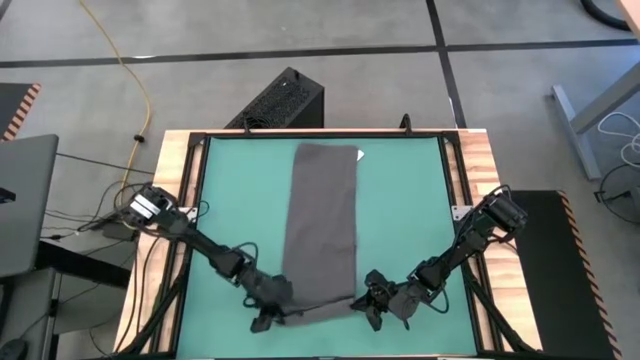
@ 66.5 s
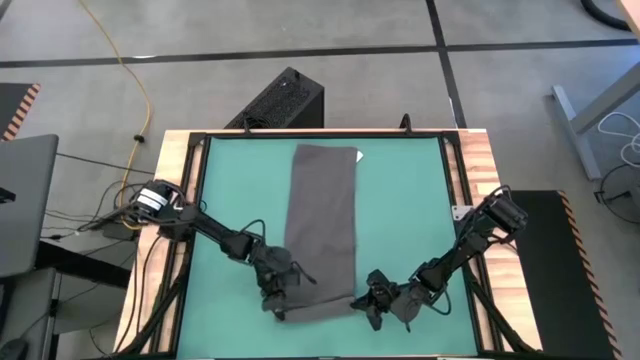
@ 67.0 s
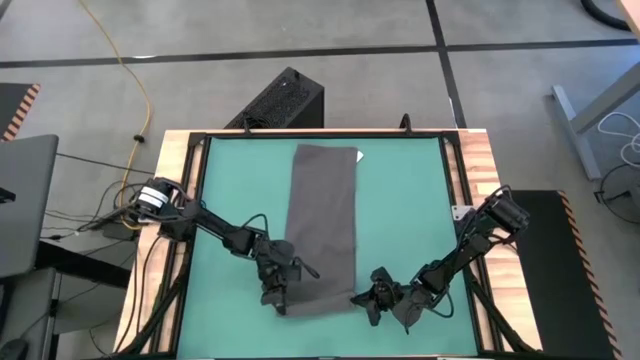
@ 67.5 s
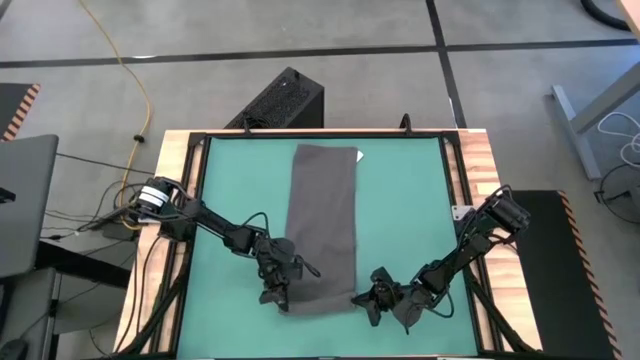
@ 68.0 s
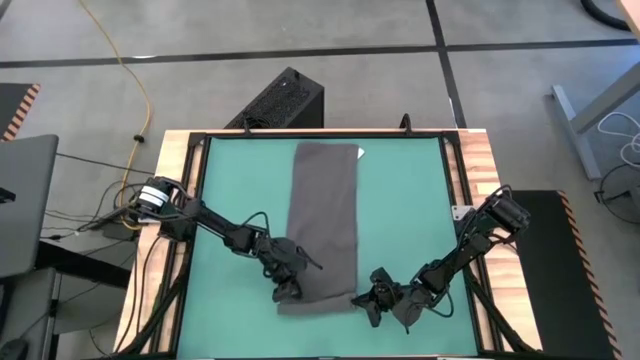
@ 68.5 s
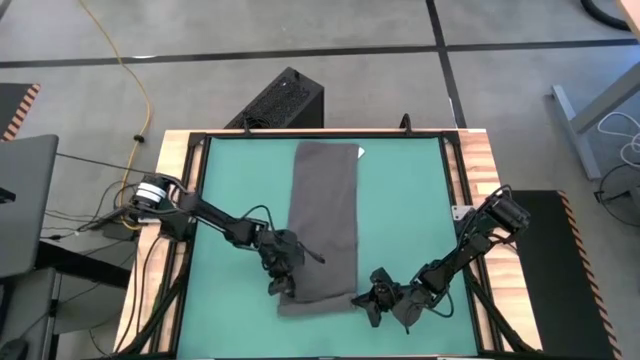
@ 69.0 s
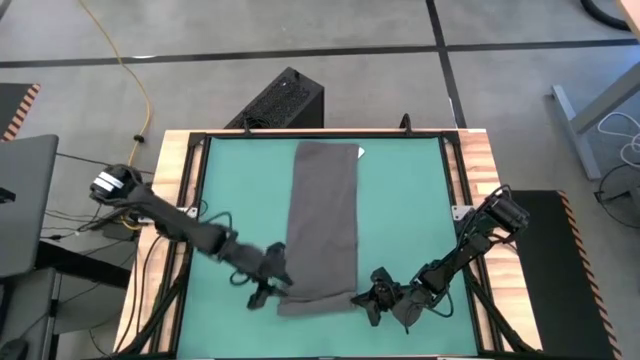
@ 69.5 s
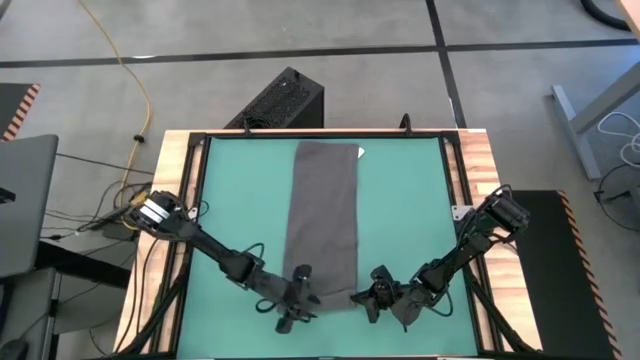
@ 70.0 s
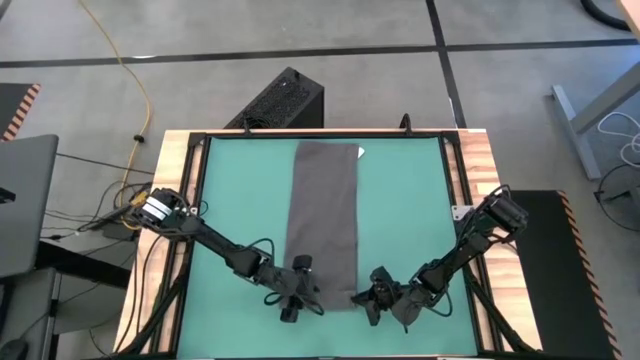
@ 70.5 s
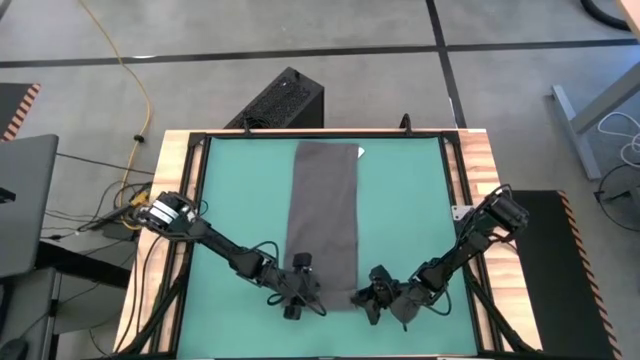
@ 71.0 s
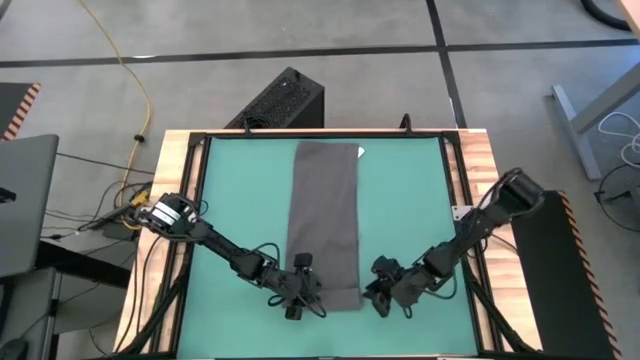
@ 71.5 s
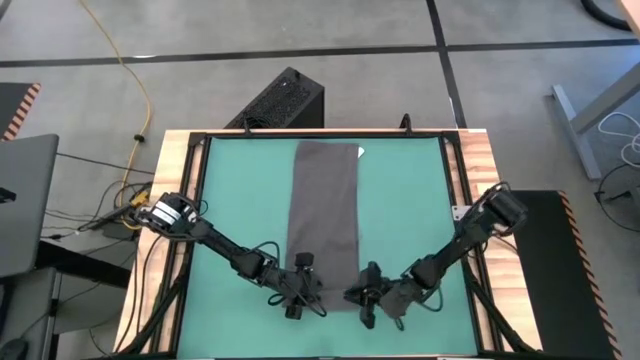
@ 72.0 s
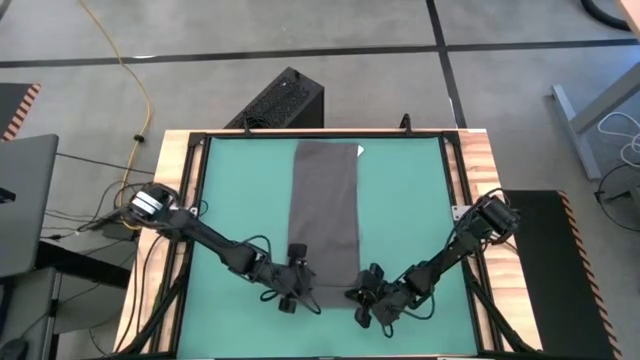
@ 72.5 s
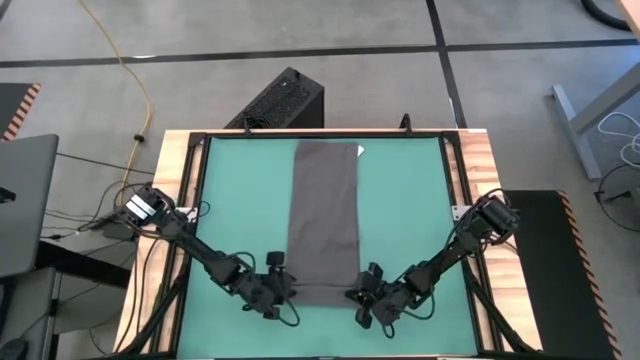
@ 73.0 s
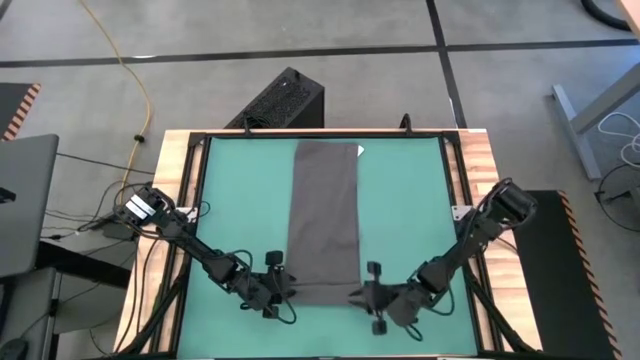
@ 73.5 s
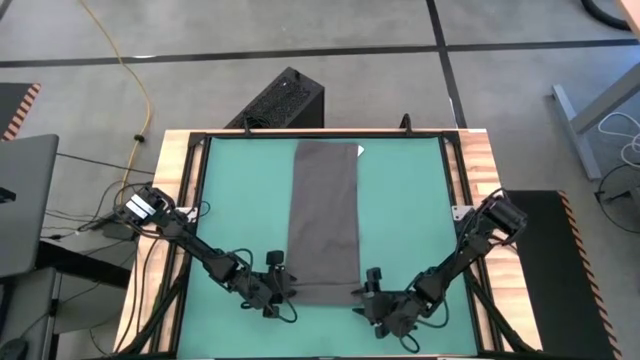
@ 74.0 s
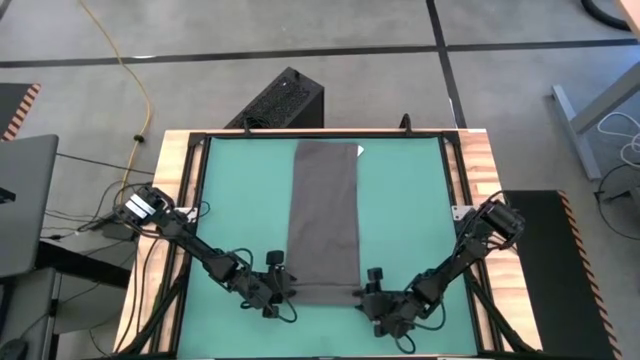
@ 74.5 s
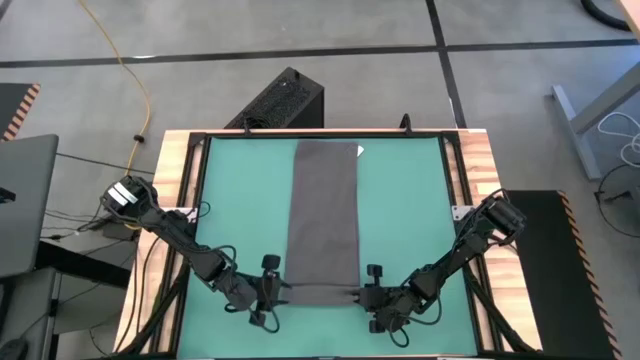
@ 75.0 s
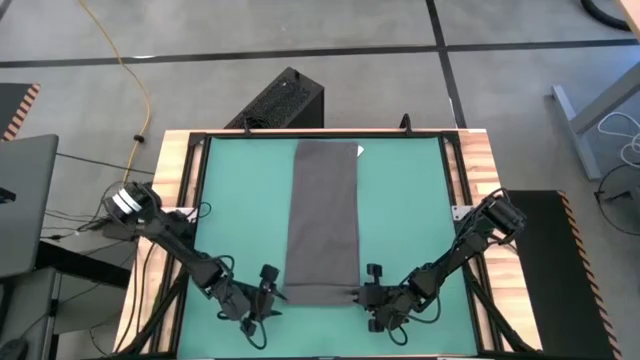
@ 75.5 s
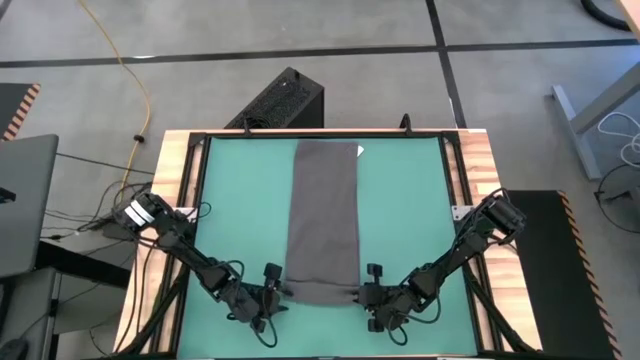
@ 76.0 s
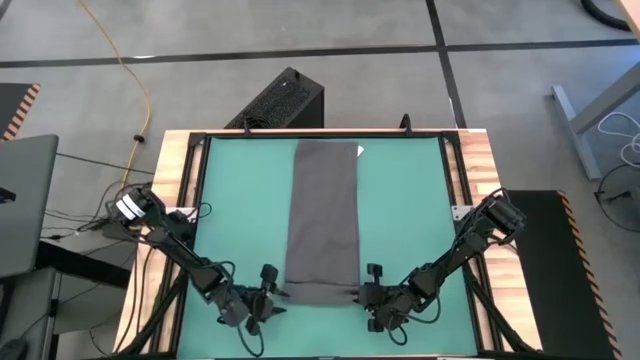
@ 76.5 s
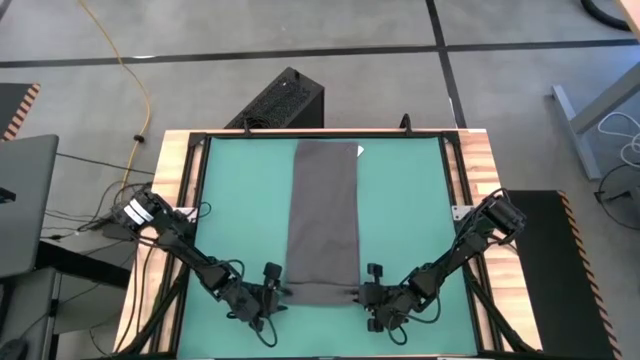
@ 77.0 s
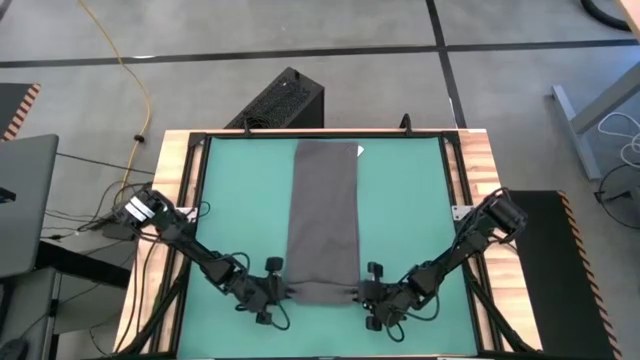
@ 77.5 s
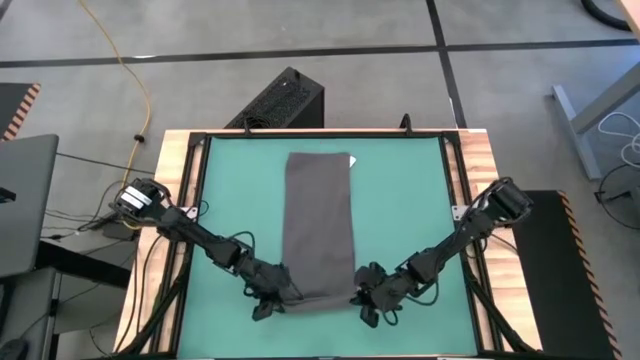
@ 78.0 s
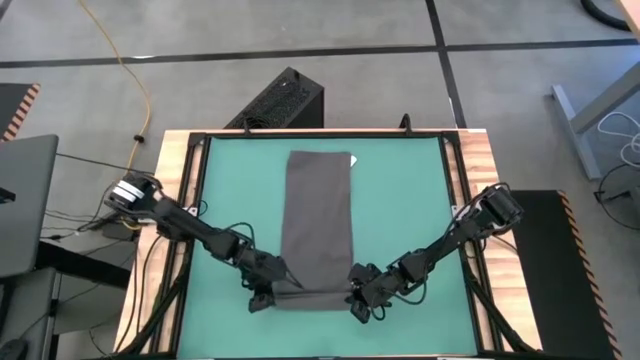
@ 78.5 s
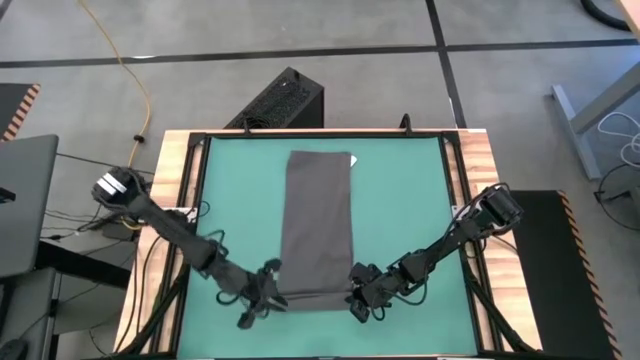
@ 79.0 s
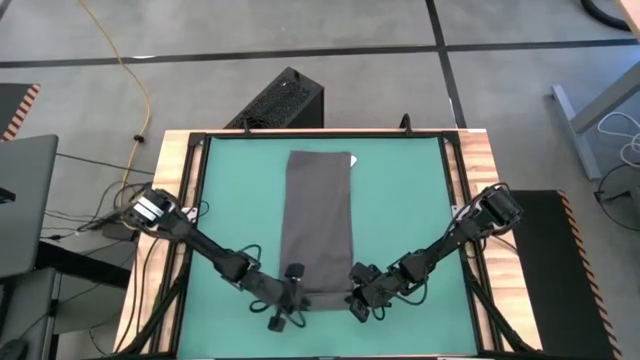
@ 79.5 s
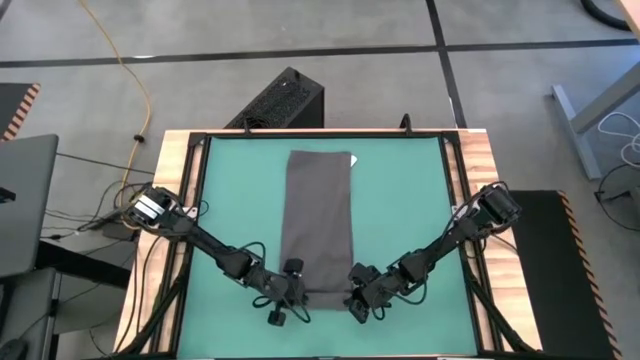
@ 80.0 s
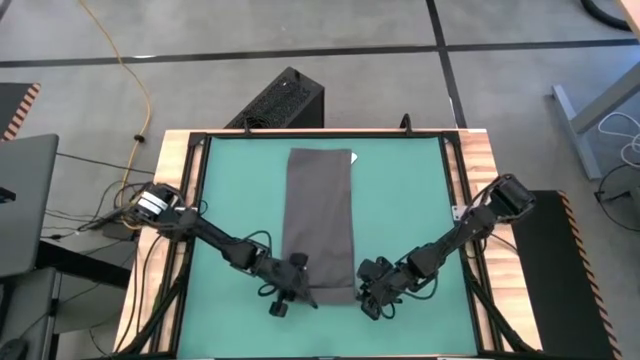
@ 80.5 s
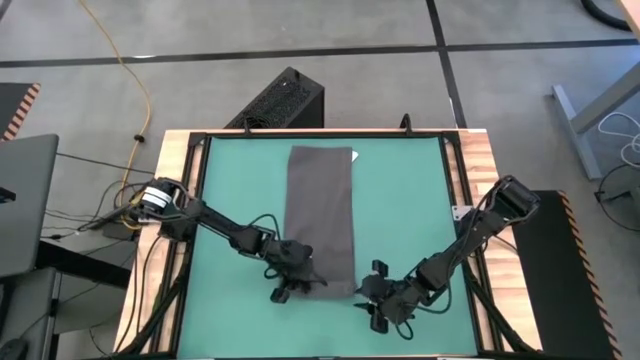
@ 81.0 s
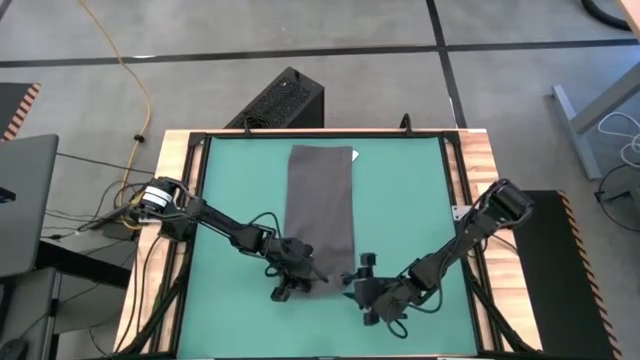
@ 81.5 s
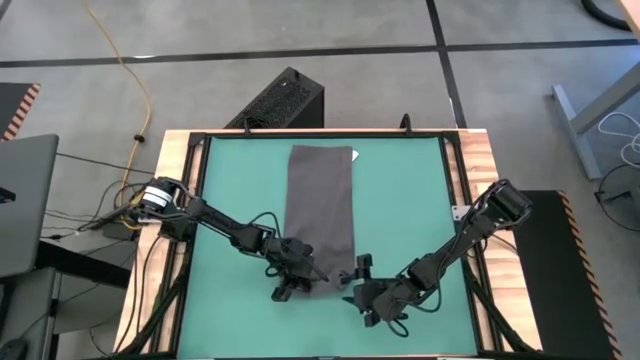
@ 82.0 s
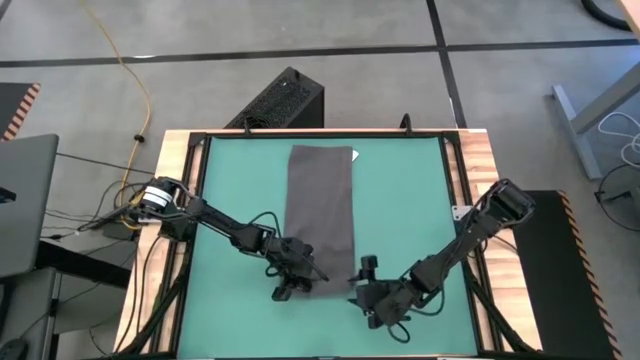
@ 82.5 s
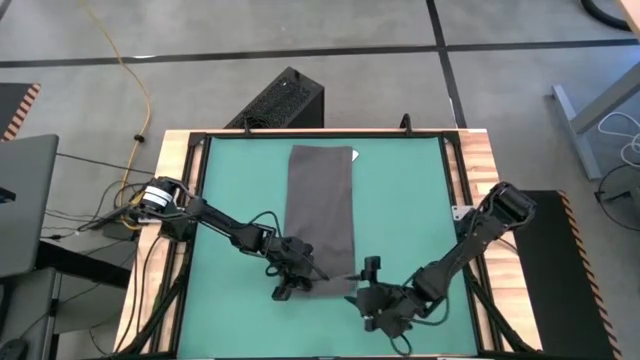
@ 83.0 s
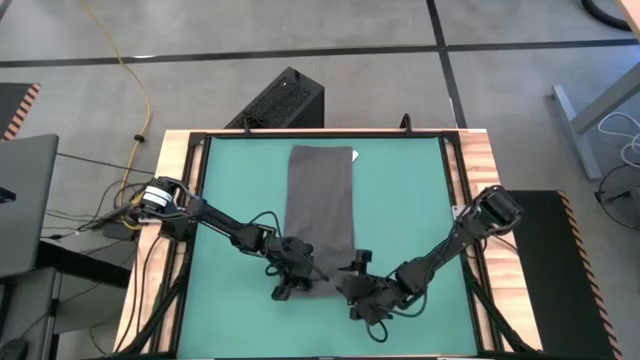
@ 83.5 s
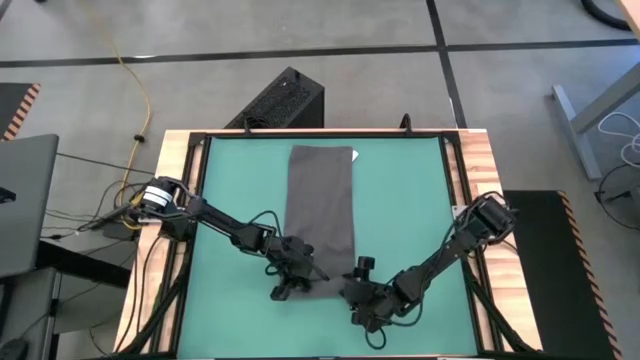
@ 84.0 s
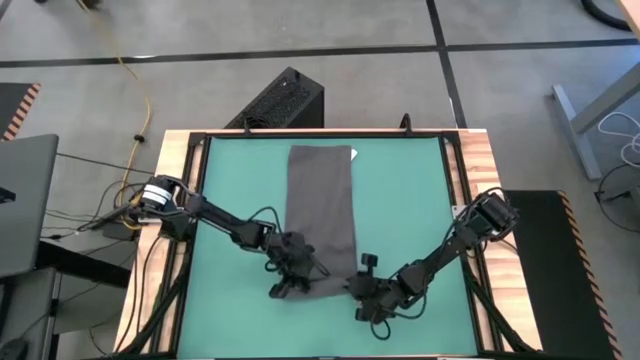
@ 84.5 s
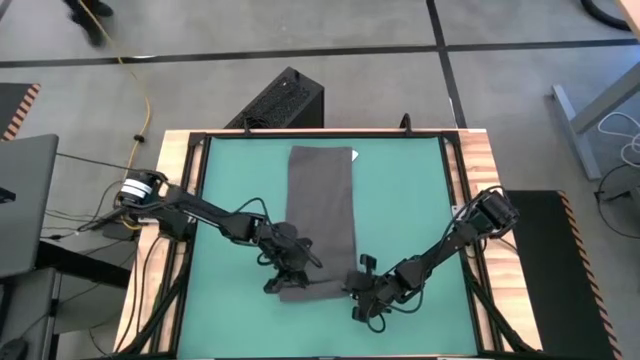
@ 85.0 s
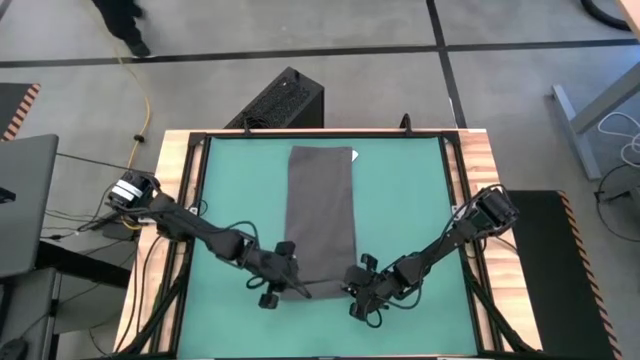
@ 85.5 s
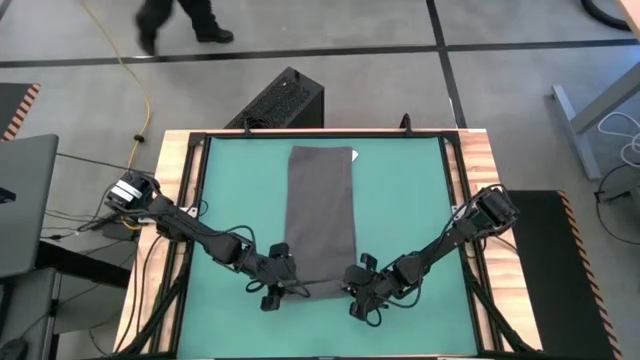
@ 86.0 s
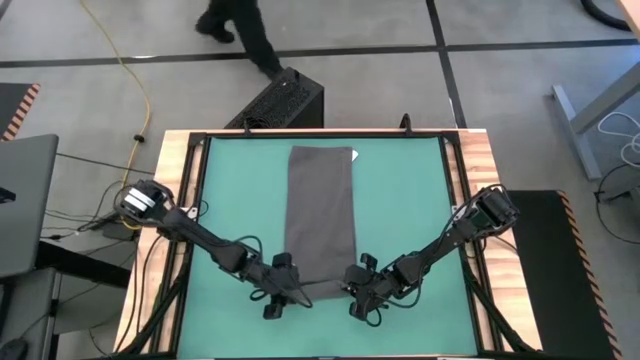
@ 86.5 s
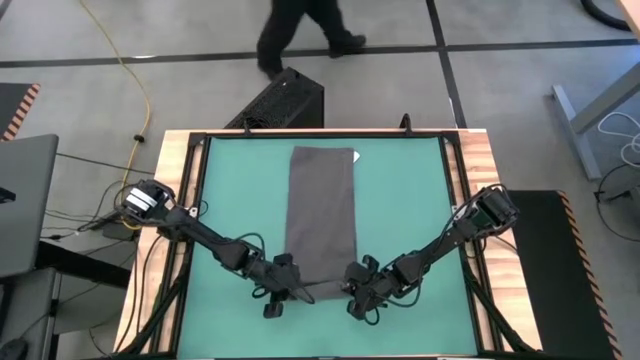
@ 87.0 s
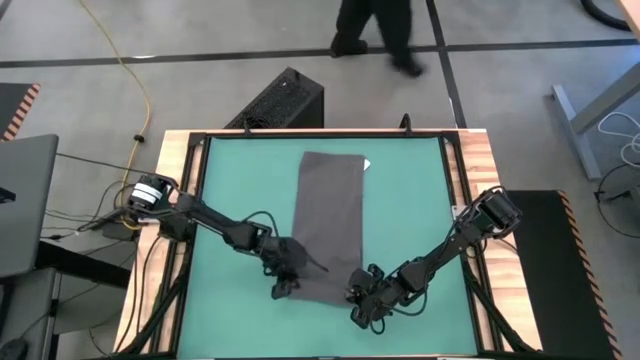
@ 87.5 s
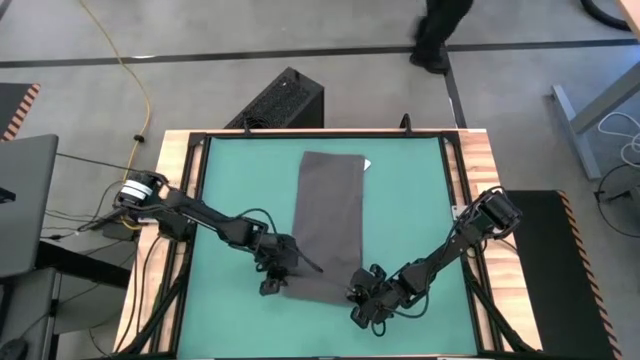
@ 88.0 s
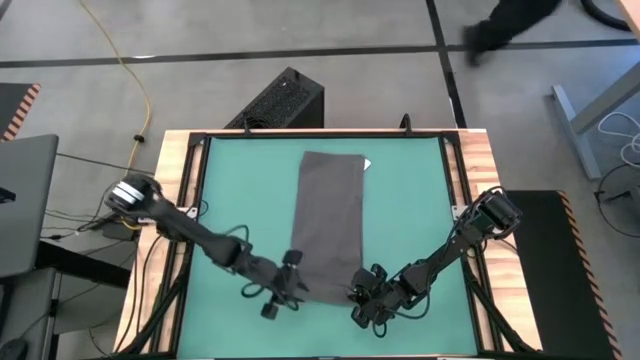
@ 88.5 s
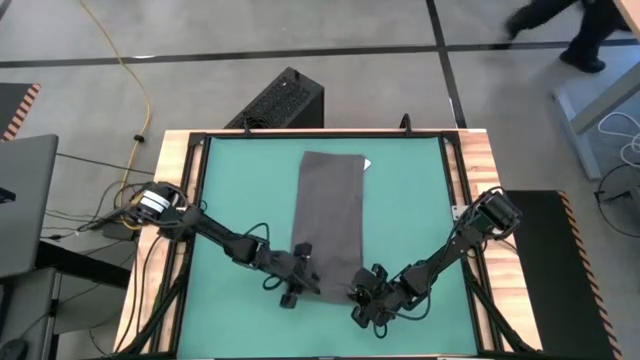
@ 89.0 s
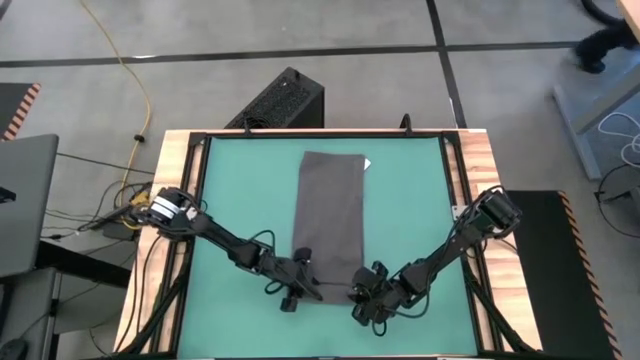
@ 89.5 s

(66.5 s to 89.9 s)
Task: Roll towel into tight, uniform cylinder
Roll the gray towel
